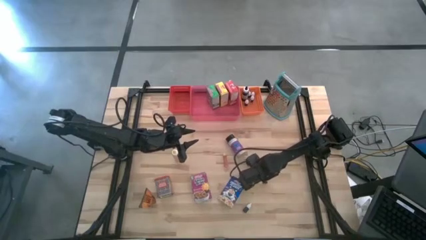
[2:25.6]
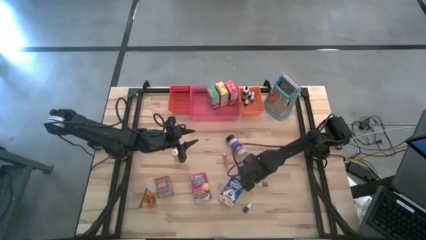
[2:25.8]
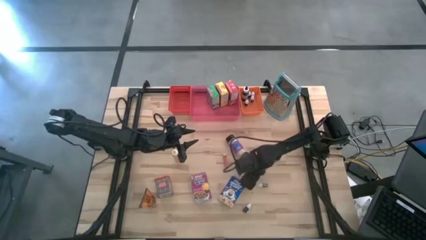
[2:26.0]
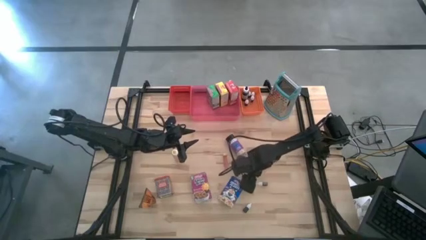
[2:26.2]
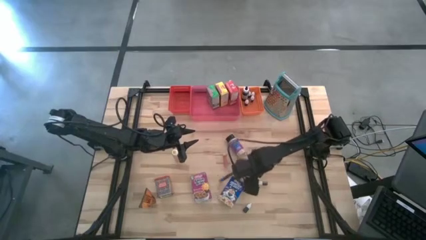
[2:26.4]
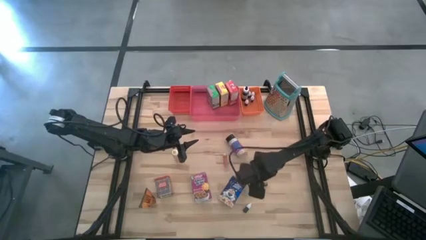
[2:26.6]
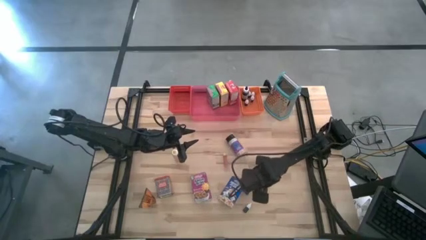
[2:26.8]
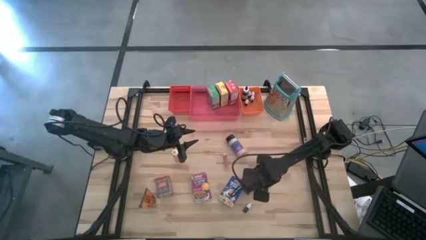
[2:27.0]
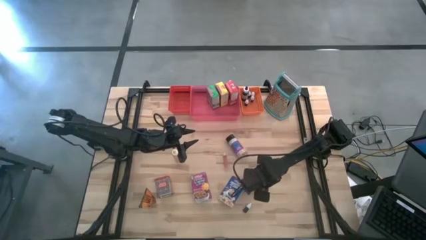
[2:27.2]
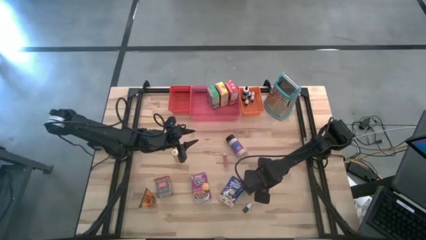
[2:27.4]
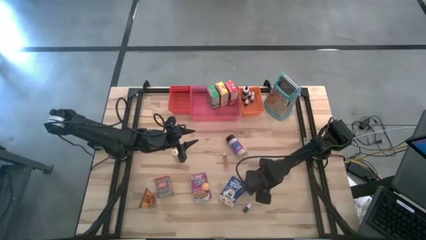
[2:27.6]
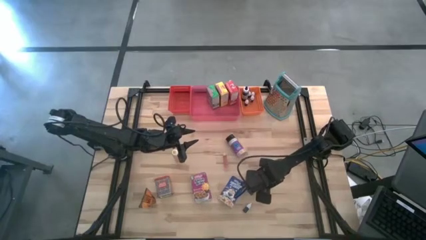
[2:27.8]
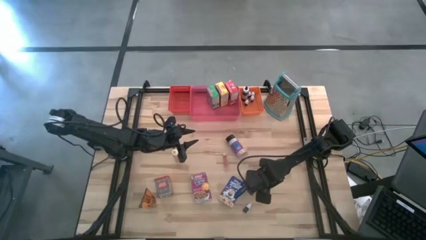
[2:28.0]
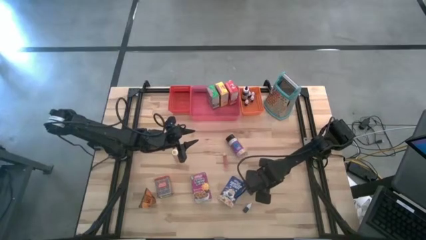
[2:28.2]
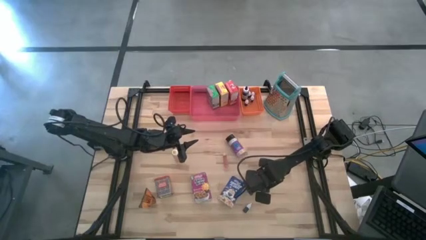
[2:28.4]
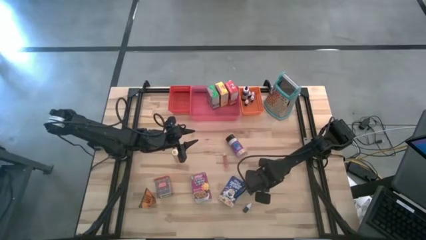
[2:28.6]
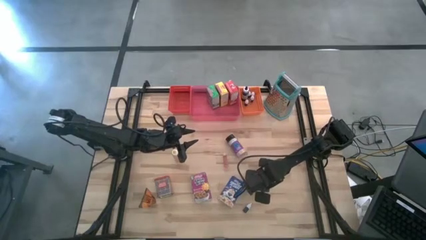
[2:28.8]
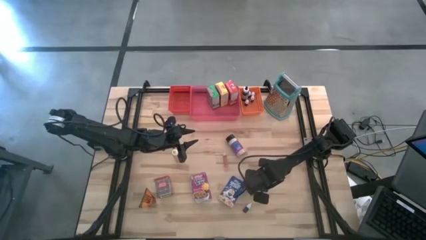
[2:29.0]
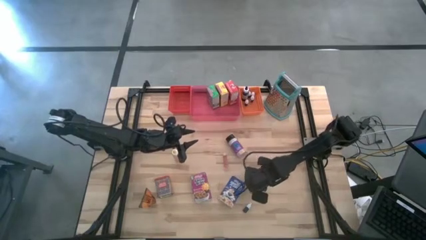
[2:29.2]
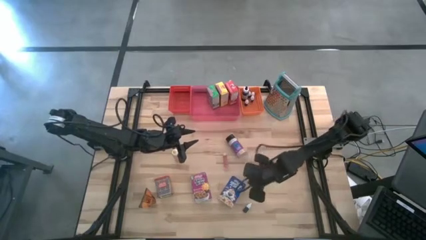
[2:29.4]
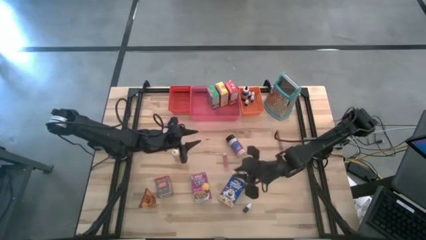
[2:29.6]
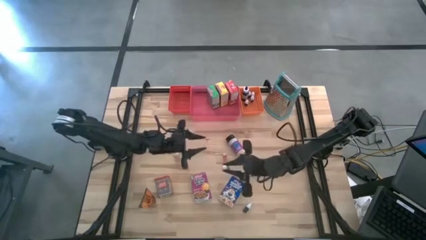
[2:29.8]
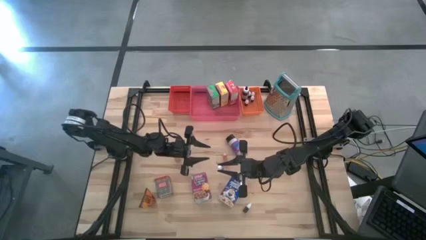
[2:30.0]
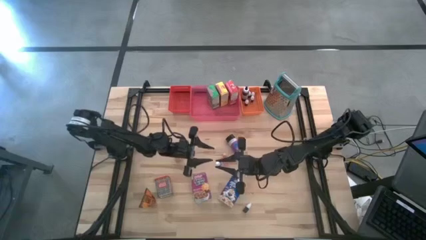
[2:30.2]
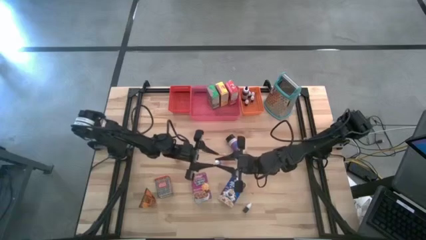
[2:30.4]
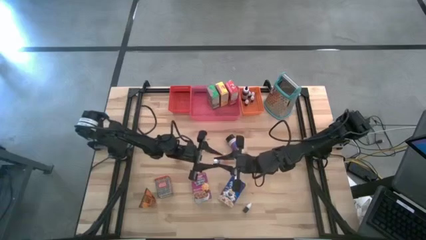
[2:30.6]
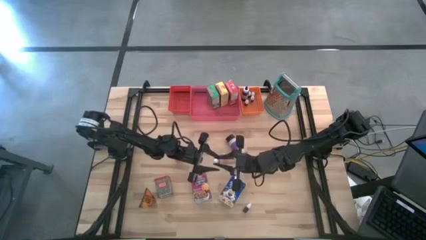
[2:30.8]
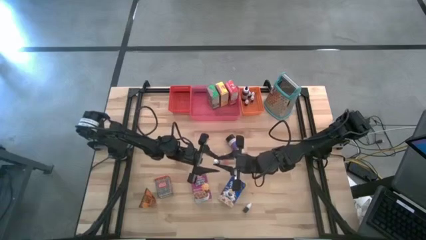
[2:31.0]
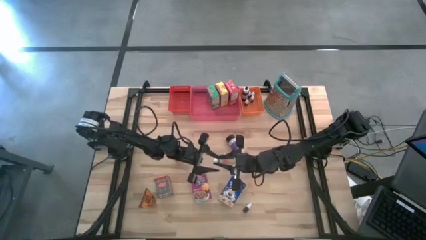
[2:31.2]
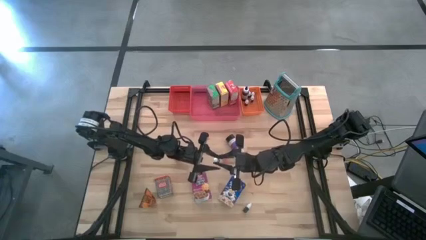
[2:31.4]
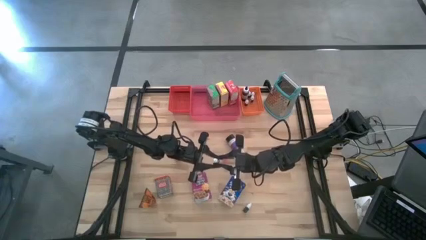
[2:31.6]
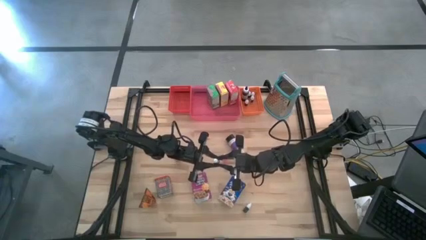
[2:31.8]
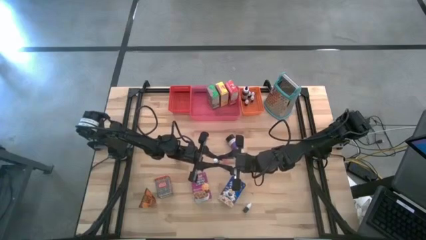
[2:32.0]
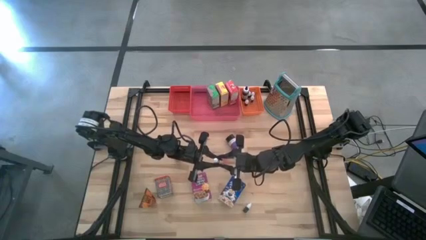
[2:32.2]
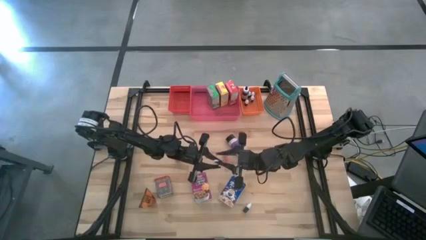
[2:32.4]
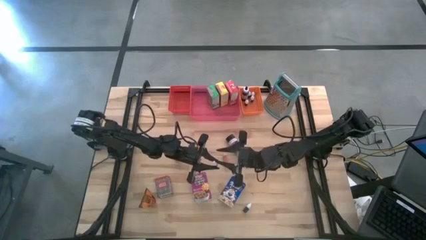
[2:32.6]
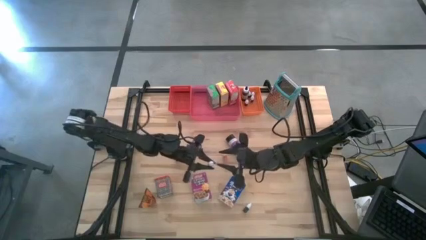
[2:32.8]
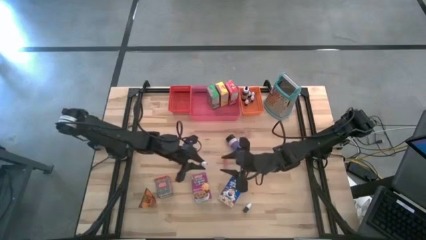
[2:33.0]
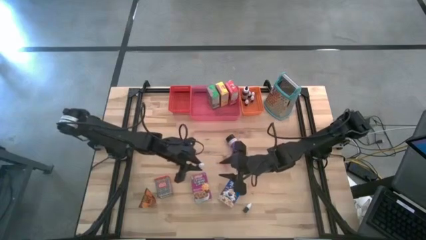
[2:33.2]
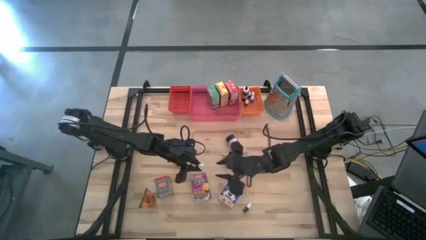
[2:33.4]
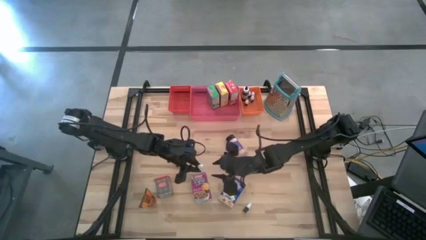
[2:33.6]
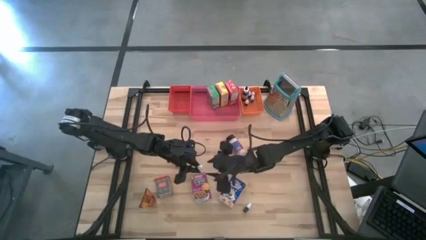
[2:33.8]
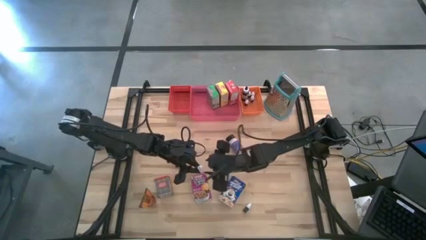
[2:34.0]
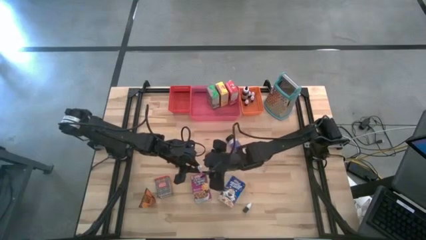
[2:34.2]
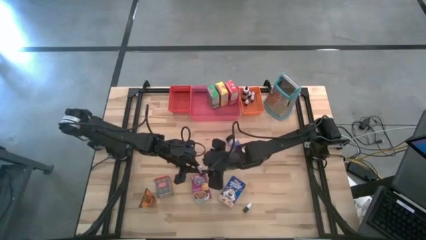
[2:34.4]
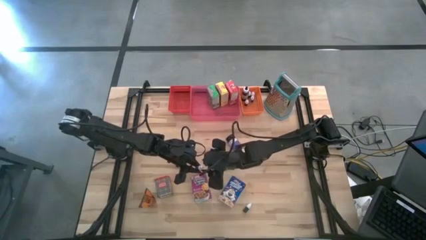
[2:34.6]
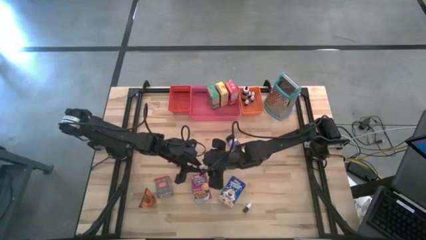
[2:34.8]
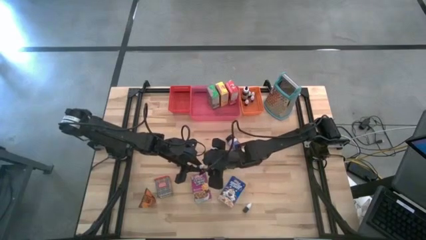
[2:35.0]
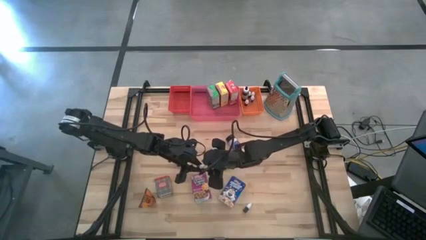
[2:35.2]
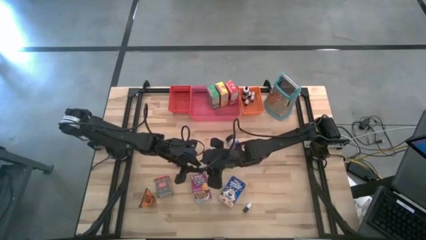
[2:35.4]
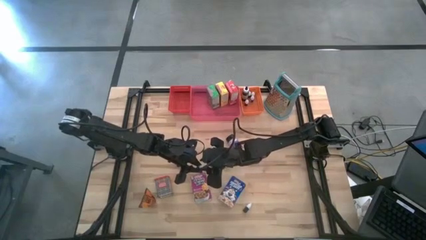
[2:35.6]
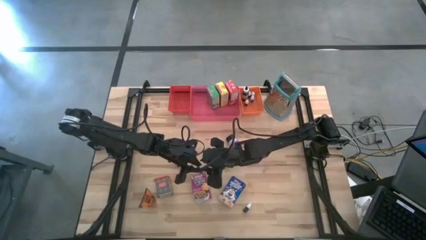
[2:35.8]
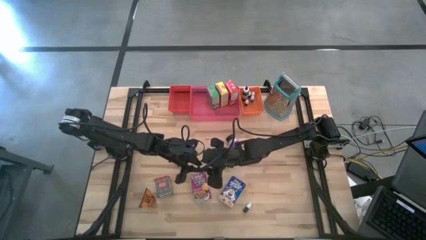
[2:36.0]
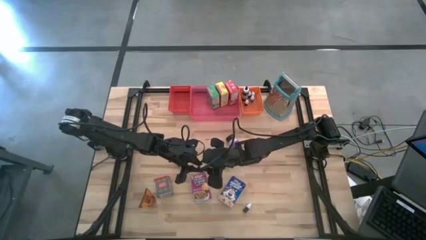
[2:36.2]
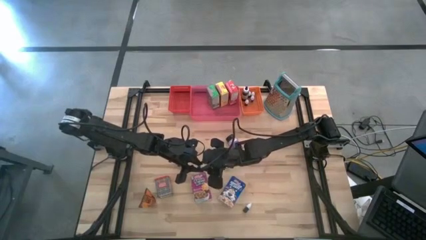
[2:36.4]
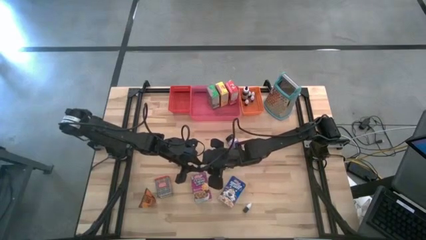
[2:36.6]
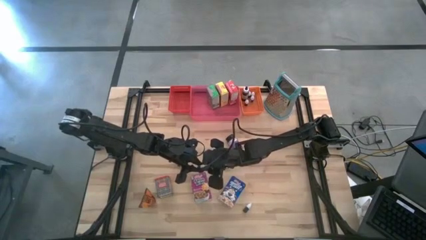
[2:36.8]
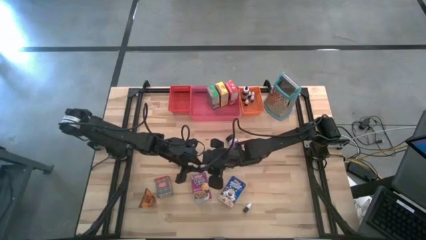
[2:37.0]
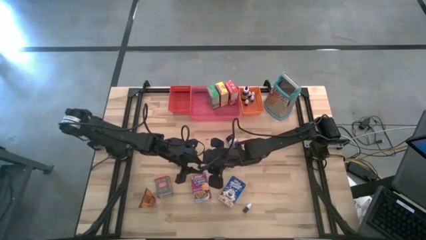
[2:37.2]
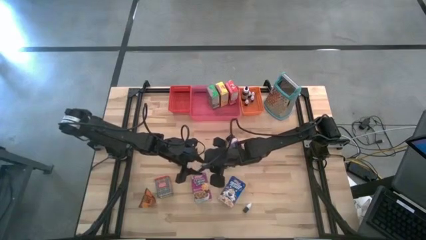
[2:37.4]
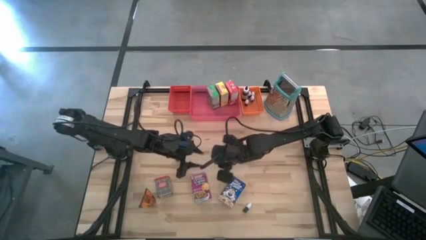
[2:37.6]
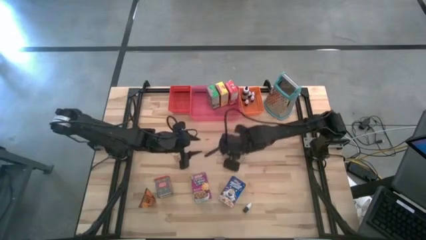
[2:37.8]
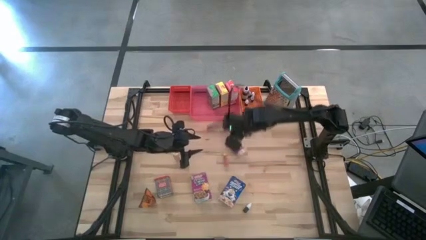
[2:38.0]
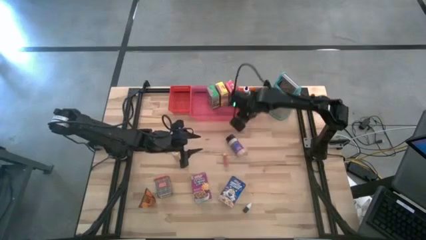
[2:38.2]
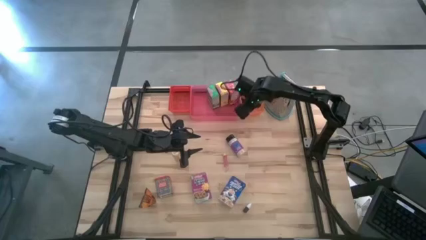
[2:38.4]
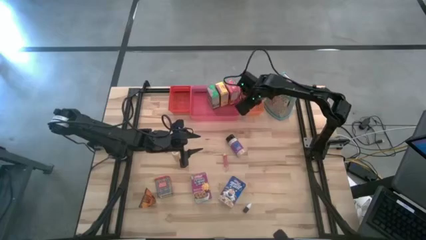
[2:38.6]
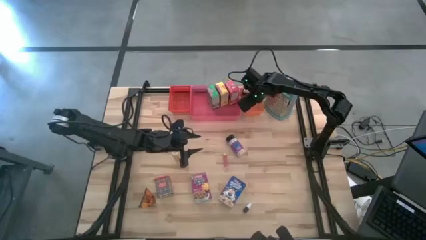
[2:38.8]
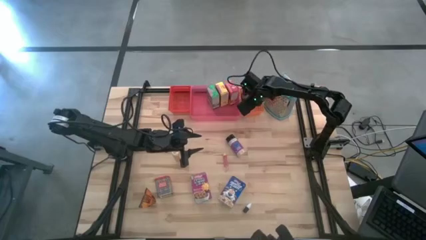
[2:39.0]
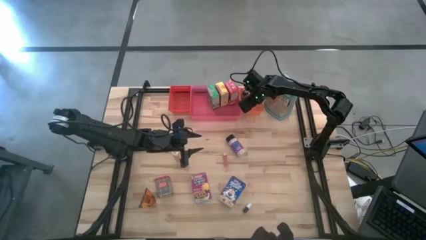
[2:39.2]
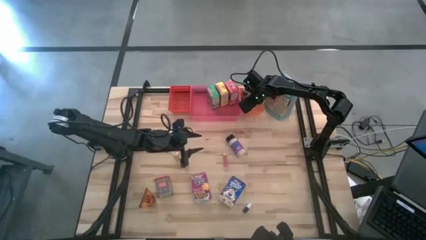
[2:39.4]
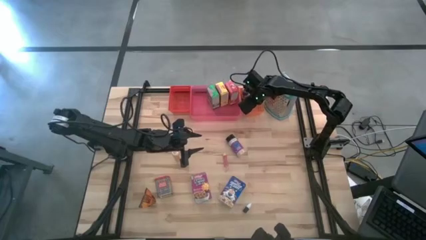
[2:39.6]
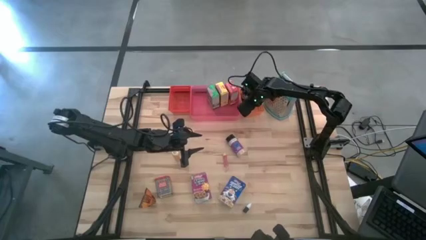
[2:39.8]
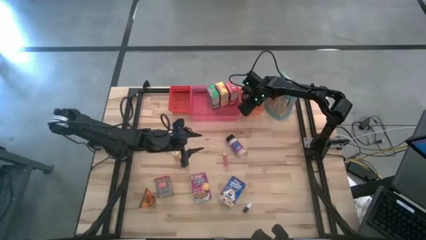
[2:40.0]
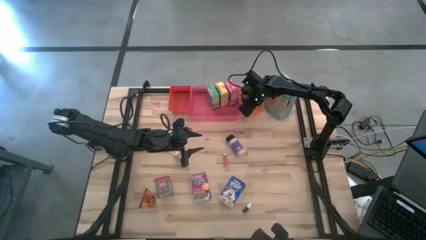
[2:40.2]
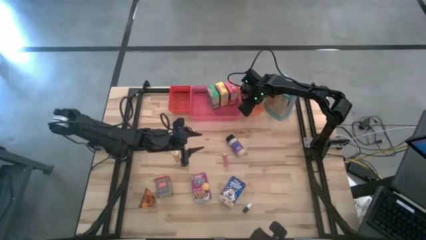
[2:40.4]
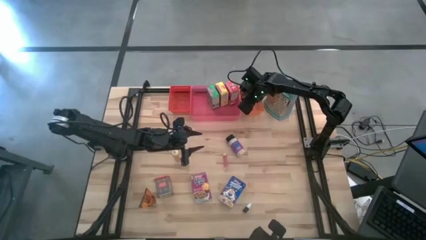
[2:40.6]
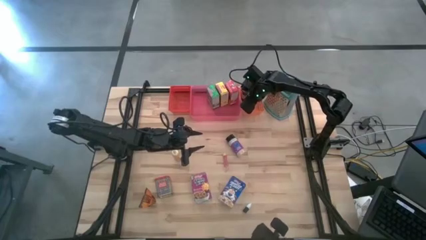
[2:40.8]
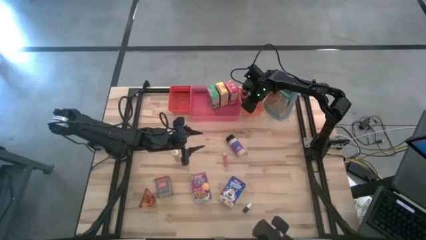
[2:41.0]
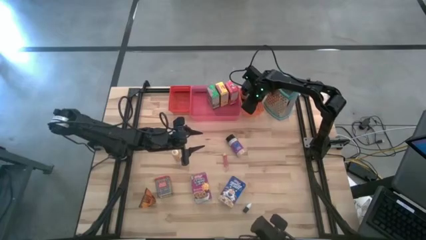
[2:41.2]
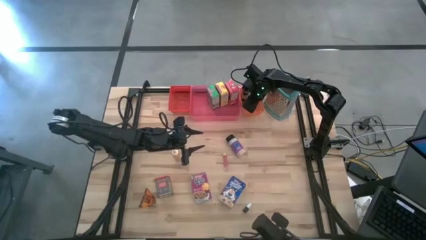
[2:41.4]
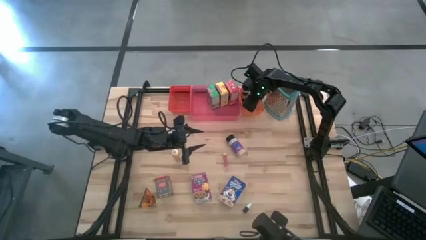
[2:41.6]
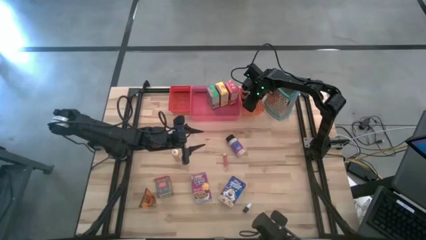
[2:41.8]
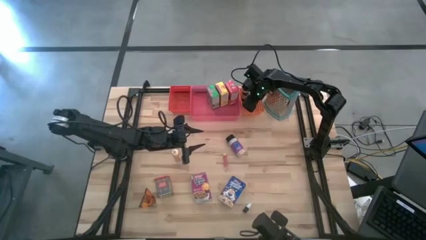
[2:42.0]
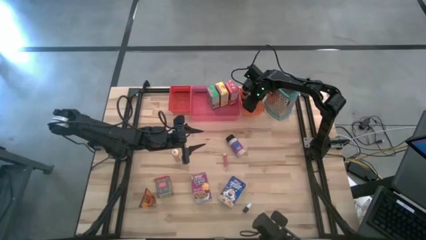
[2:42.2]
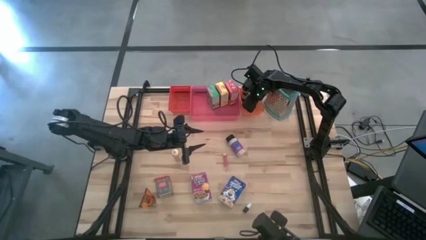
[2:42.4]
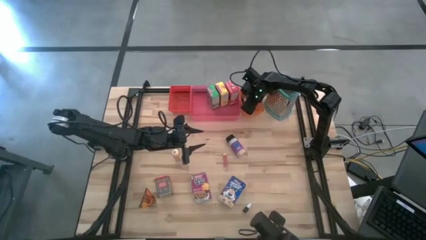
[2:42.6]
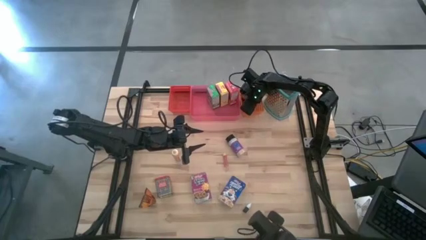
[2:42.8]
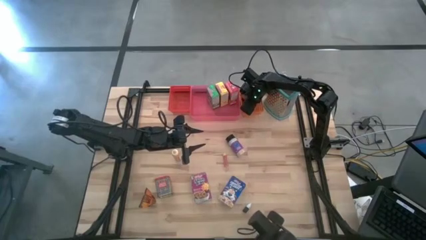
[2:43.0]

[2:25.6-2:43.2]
Task: Pick & Place Kitchen Items
Put the green food coloring bottle into the orange bin
